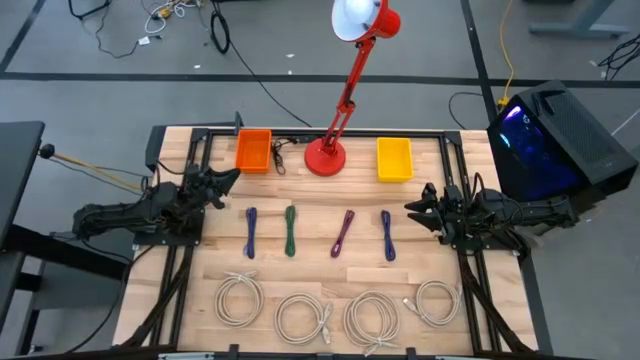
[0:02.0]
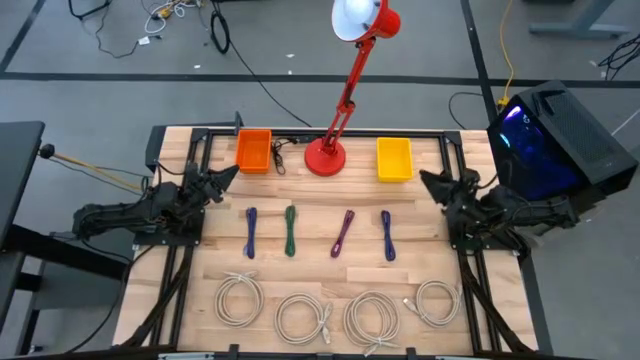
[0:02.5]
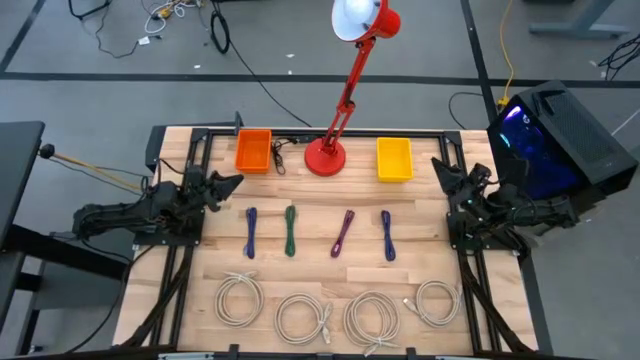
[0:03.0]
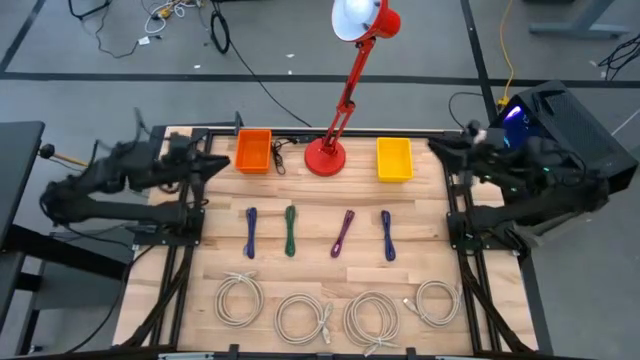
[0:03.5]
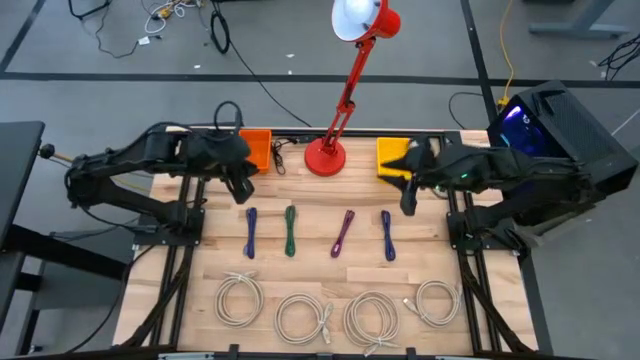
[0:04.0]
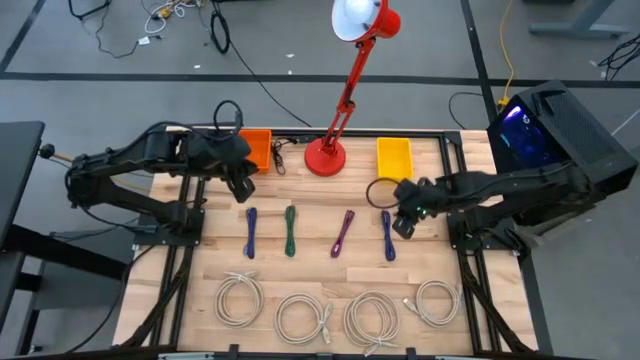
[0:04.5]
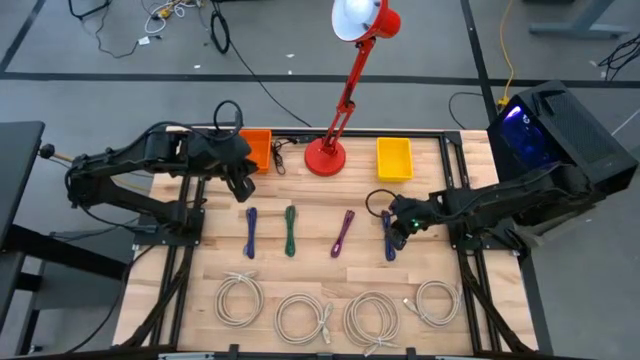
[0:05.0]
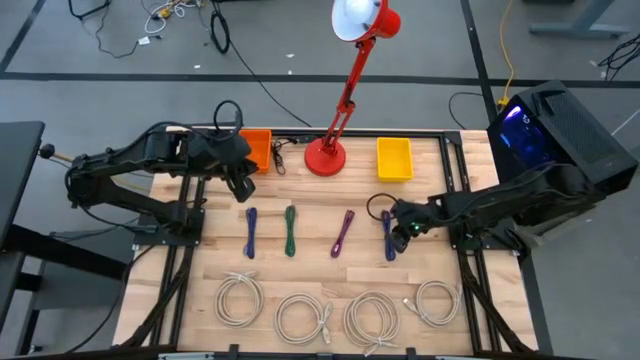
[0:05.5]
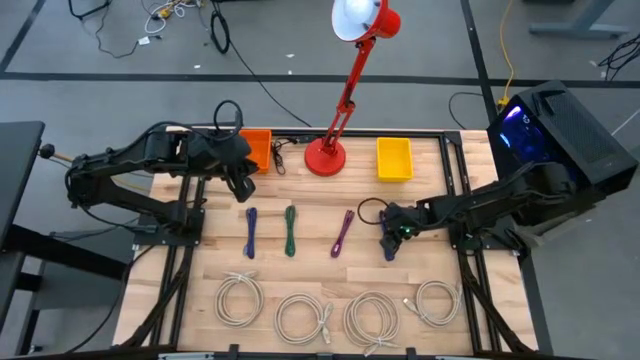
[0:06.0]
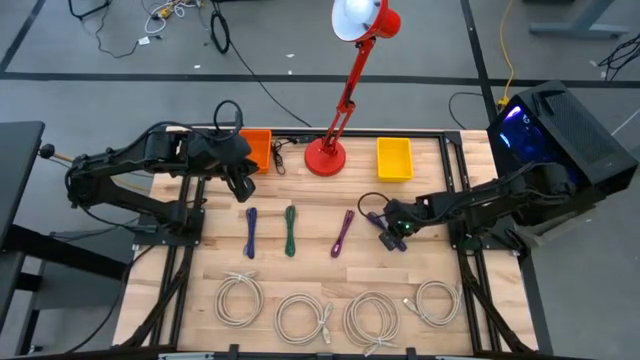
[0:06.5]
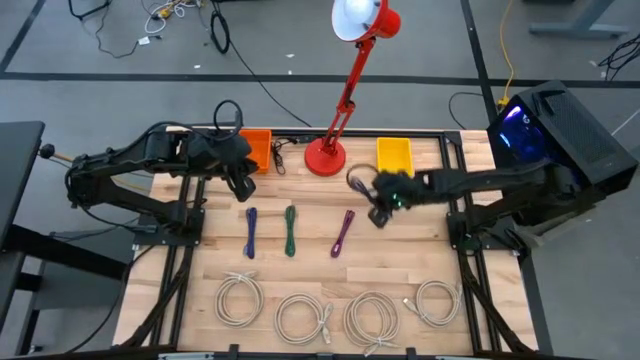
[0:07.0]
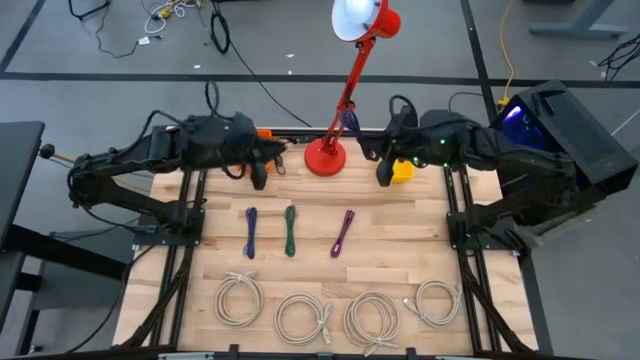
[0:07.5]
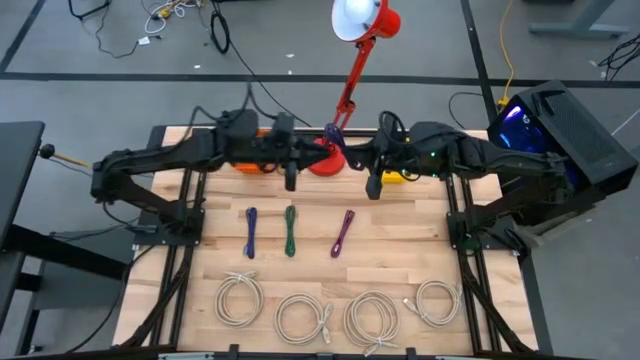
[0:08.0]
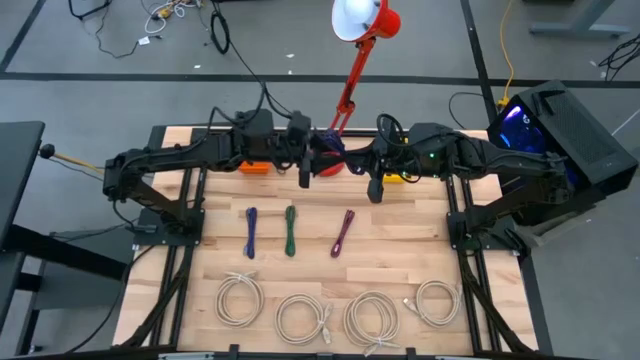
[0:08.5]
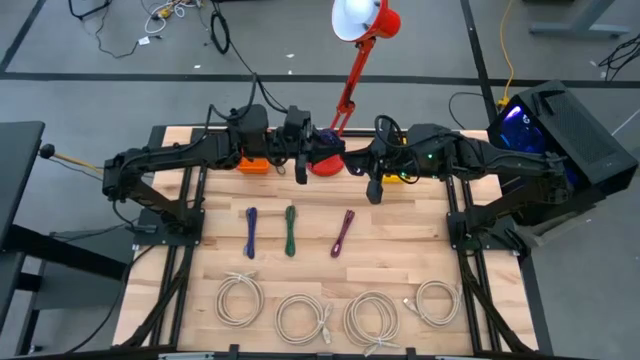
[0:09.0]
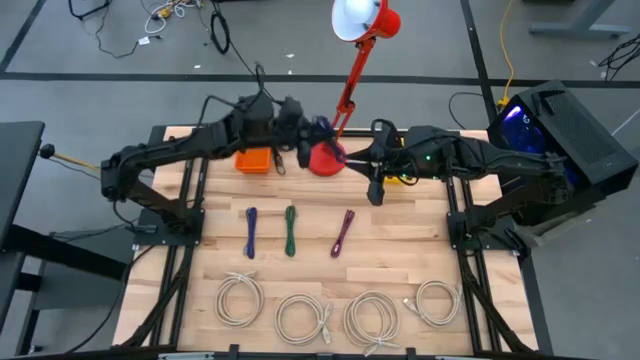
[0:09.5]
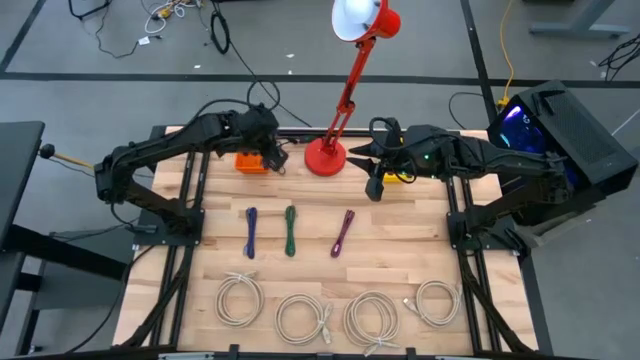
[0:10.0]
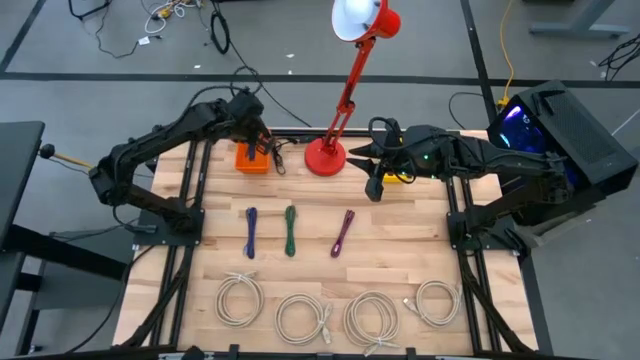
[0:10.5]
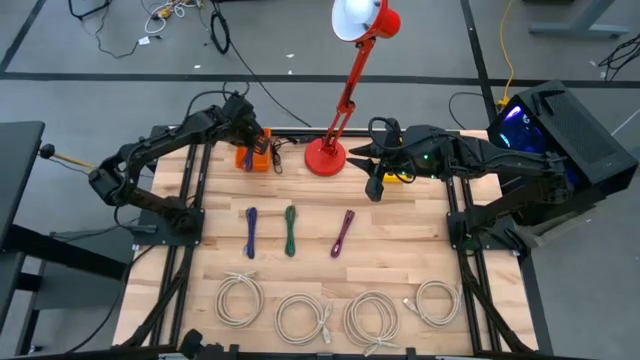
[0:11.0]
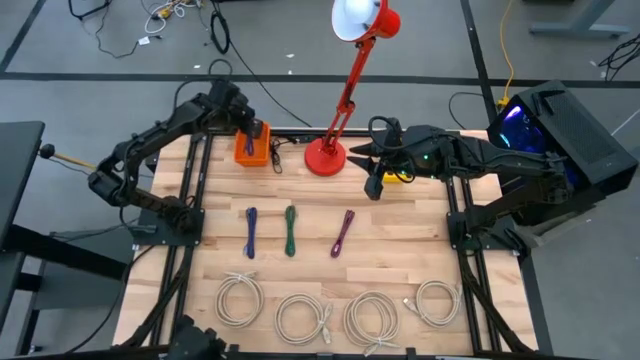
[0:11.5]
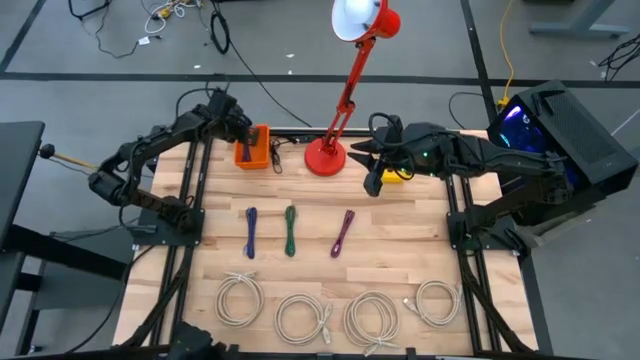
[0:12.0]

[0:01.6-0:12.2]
Task: Pick & Place USB Port
Put the blue and black charger cable into the orange bin

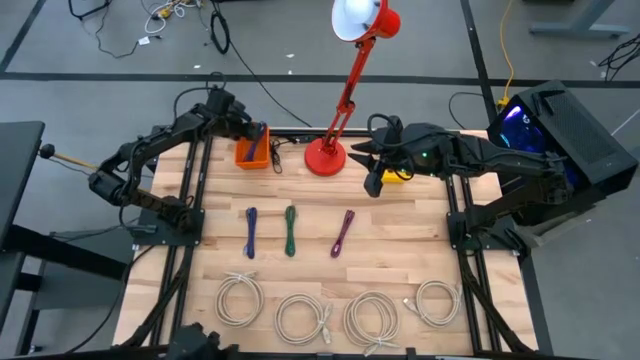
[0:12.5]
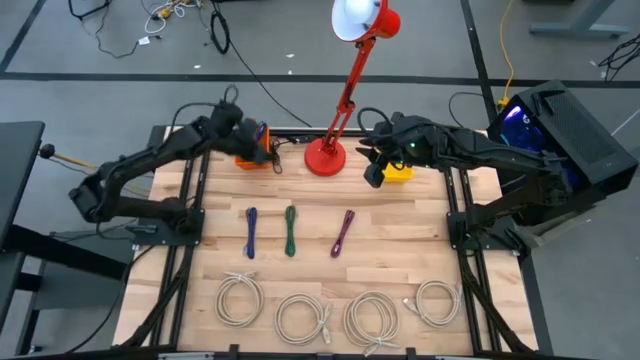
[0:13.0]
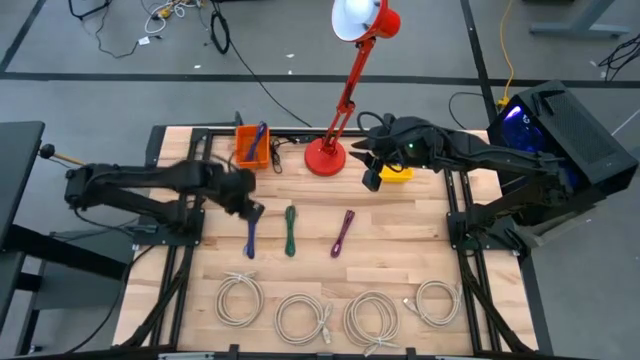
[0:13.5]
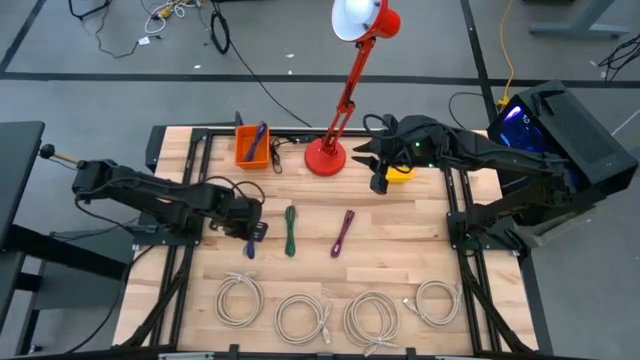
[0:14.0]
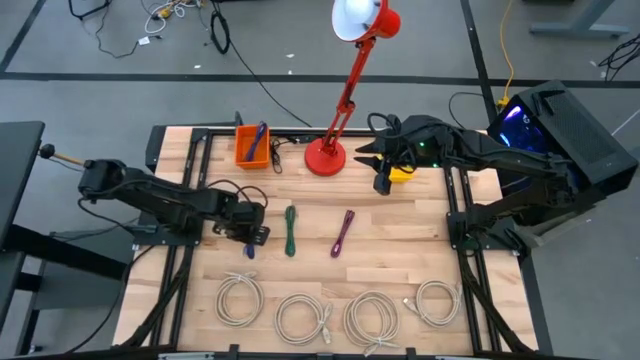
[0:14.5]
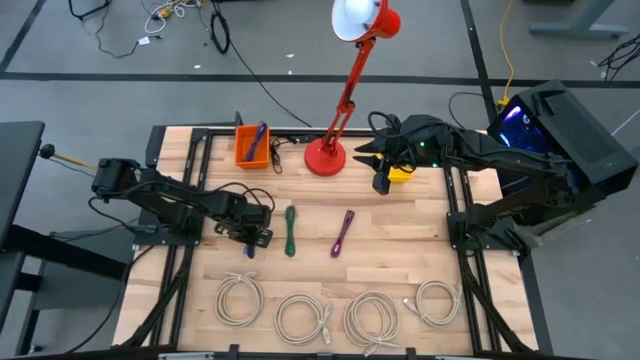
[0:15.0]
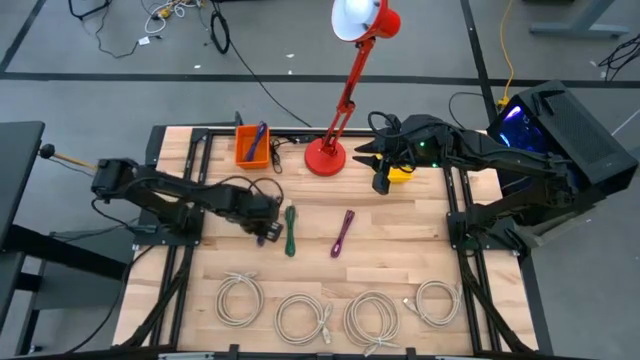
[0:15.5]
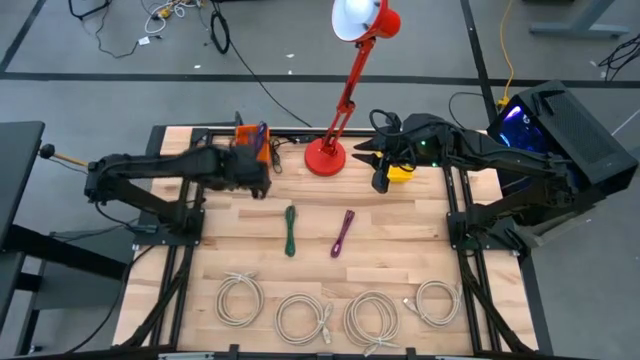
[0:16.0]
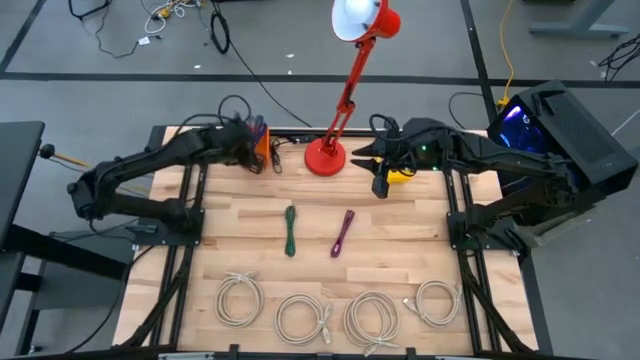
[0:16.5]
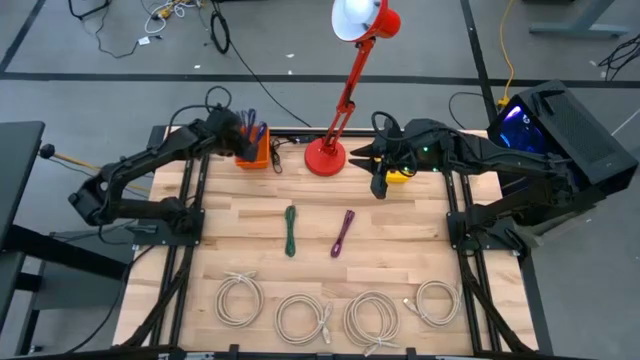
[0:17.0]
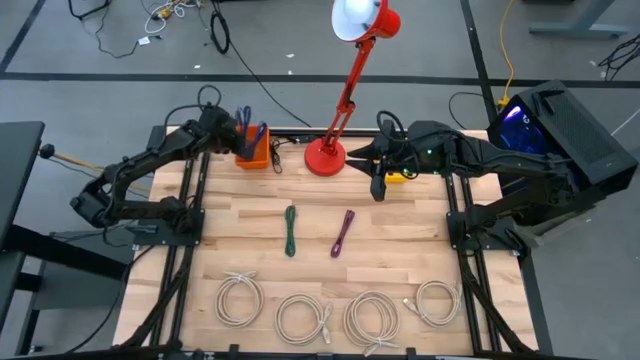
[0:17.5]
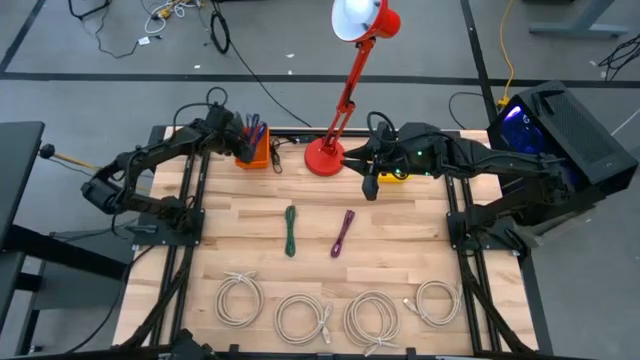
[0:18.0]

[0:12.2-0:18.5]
Put the blue and black charger cable into the orange bin

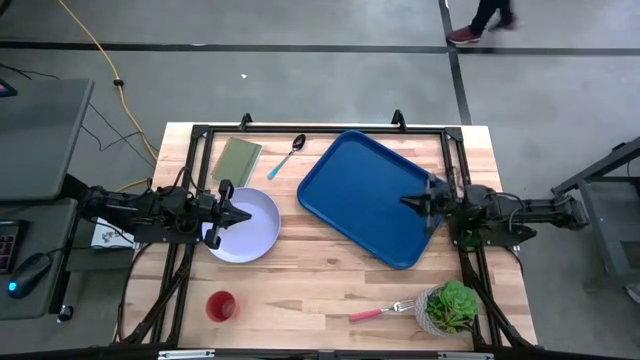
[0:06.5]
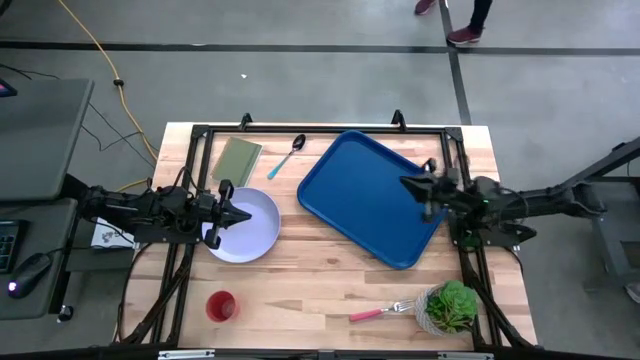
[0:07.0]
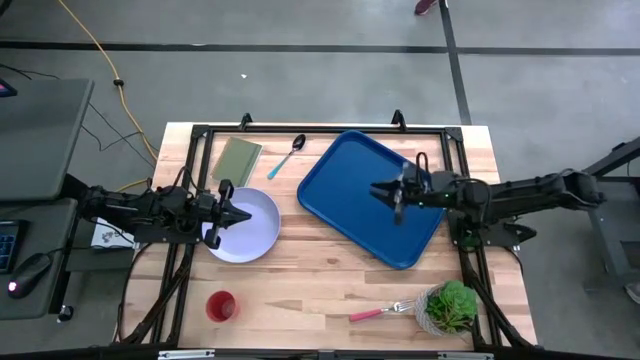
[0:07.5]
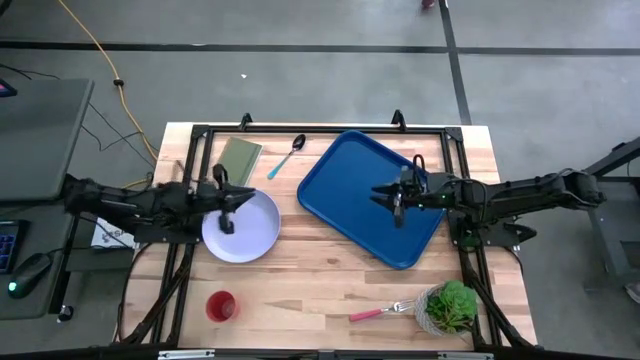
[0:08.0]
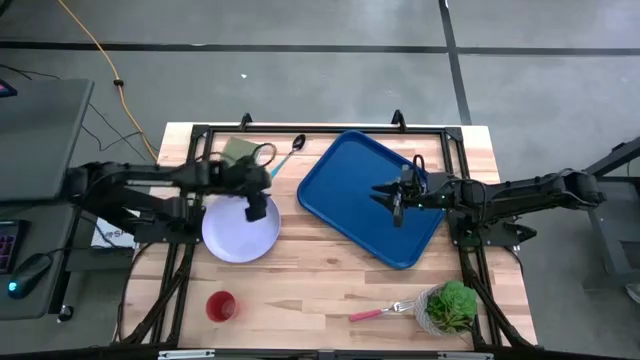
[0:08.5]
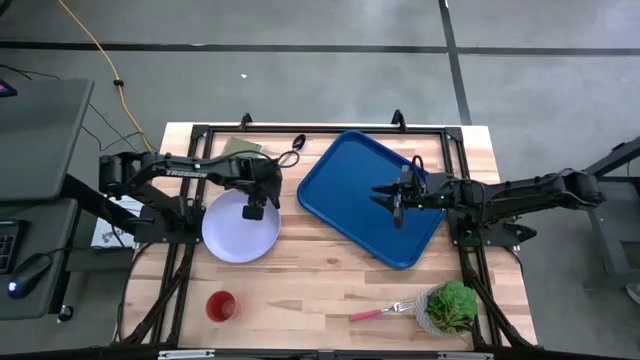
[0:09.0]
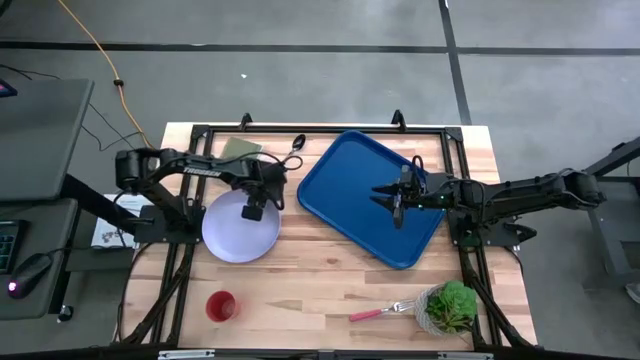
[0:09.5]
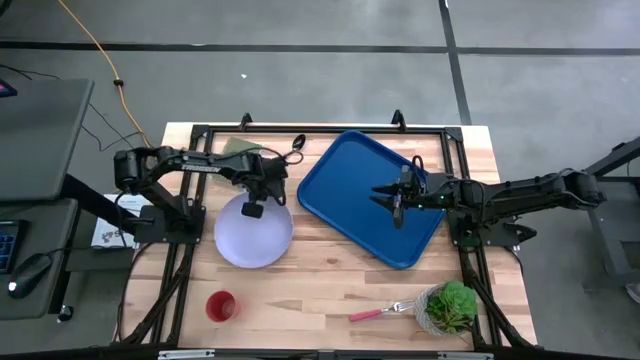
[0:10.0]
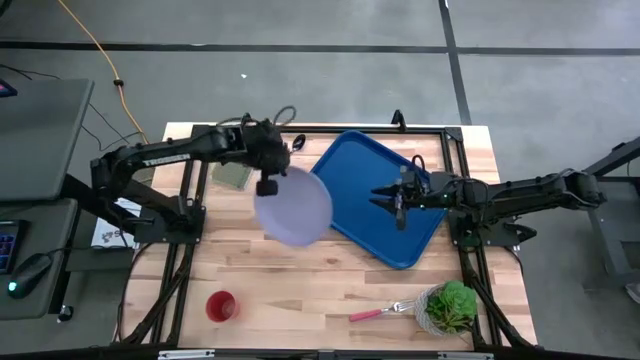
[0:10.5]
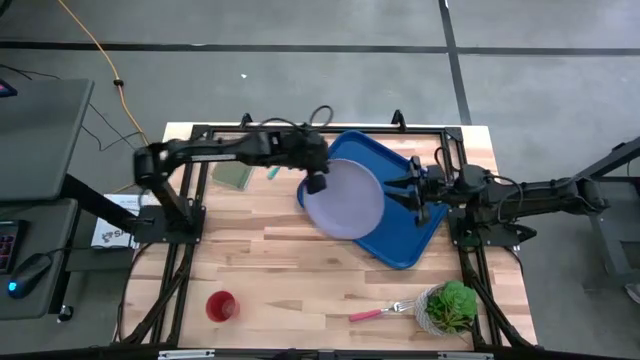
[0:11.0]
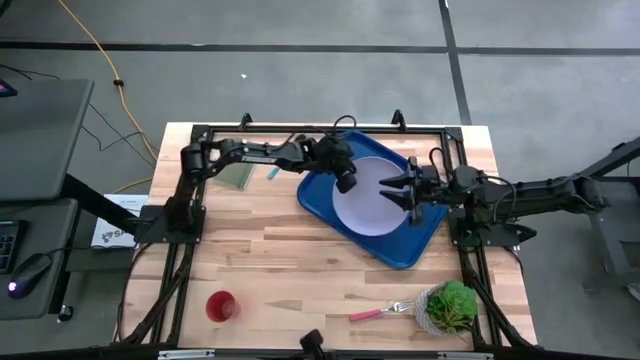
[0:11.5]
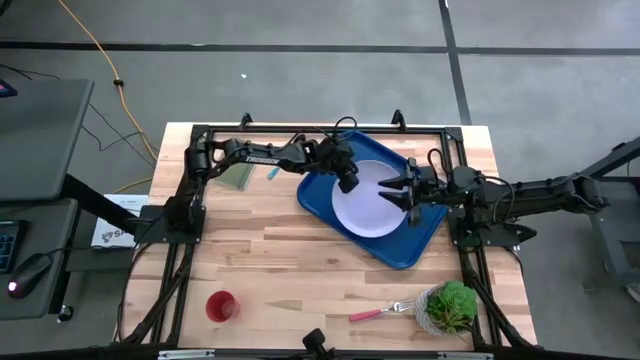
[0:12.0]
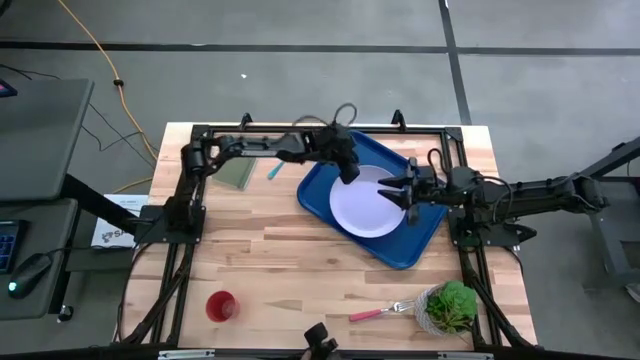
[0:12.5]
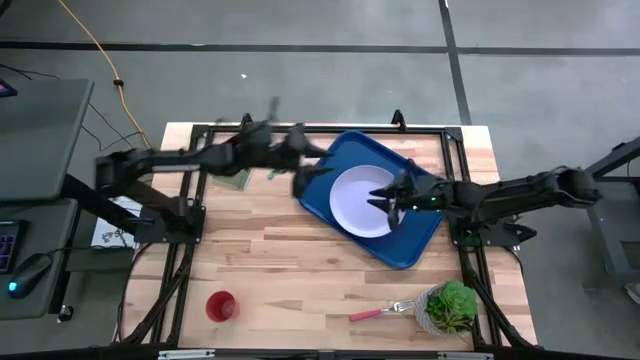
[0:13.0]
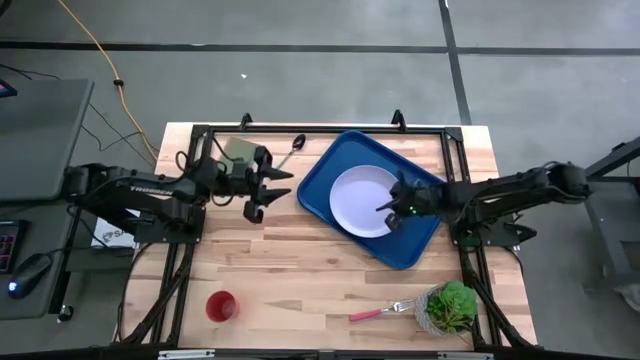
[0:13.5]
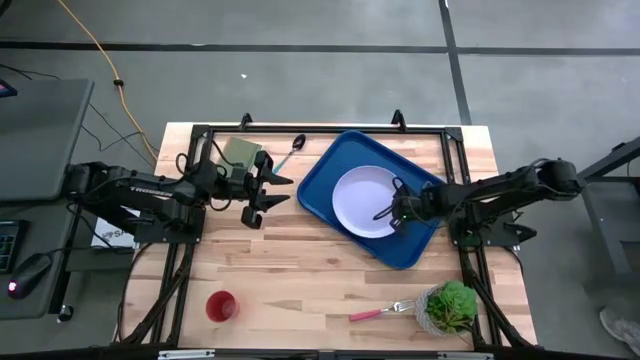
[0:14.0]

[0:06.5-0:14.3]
Task: Pick and place plate/cup/fork/spoon on tray
Put the white plate on the blue tray
